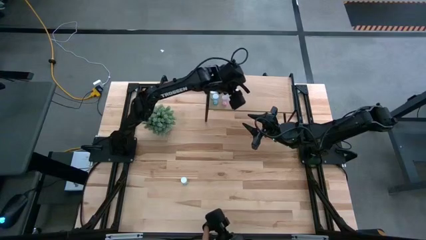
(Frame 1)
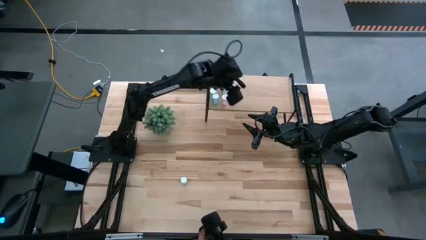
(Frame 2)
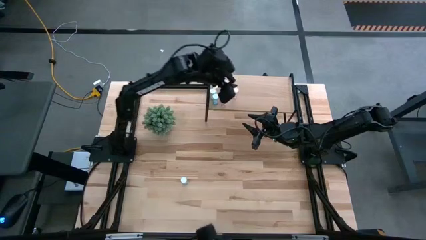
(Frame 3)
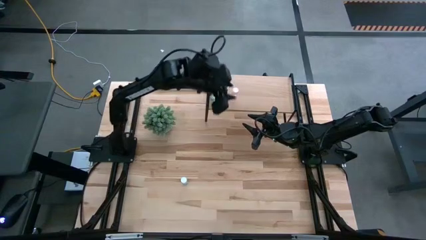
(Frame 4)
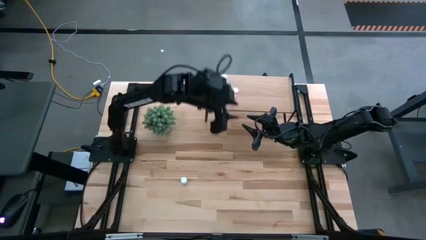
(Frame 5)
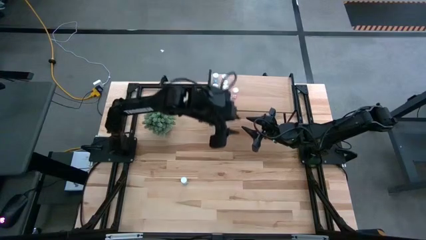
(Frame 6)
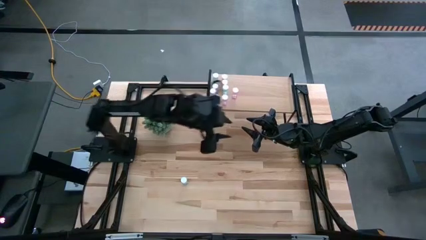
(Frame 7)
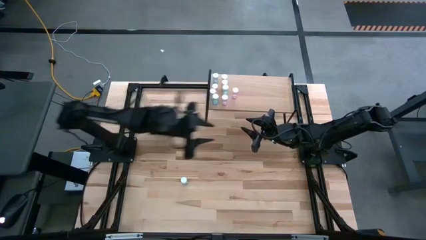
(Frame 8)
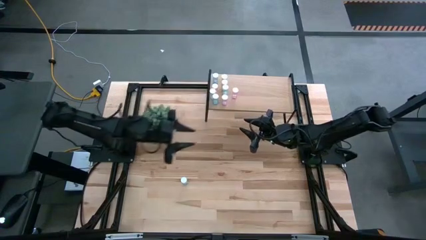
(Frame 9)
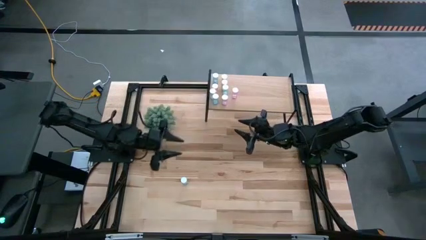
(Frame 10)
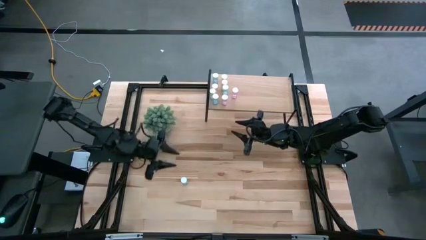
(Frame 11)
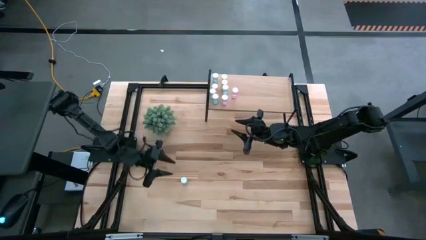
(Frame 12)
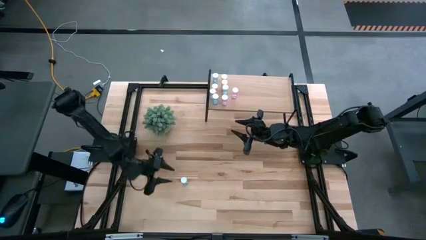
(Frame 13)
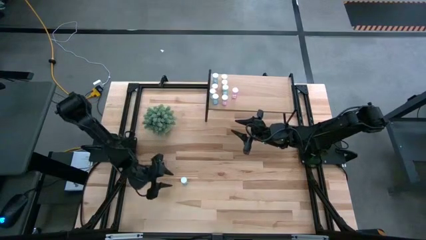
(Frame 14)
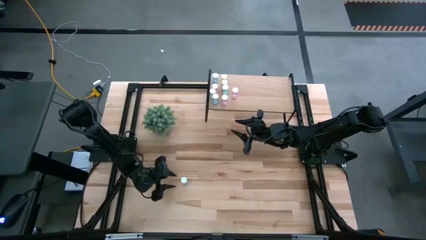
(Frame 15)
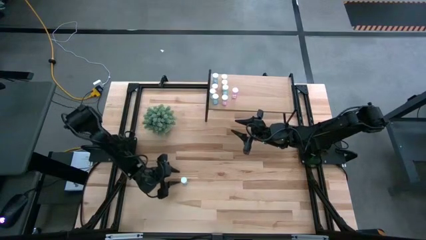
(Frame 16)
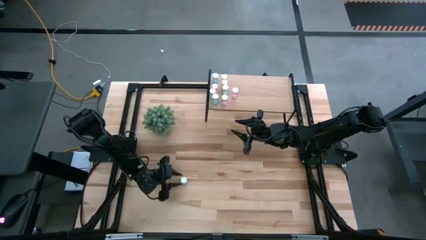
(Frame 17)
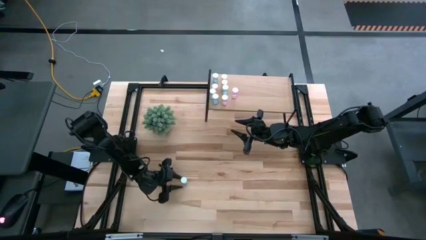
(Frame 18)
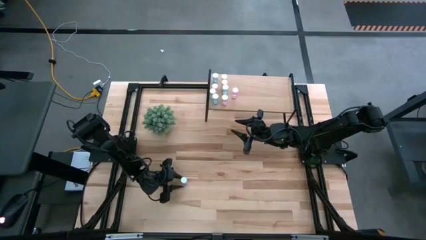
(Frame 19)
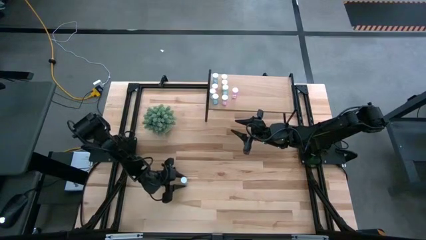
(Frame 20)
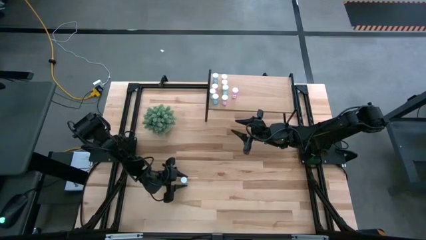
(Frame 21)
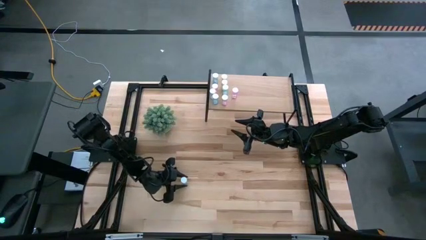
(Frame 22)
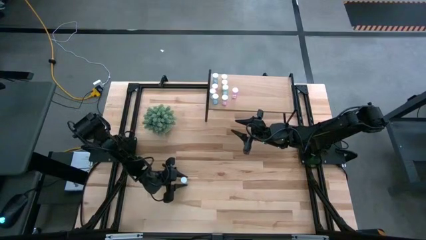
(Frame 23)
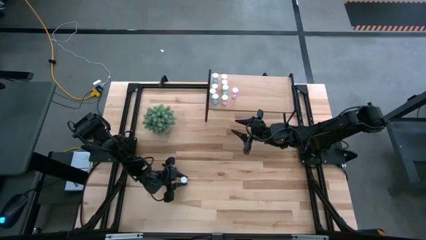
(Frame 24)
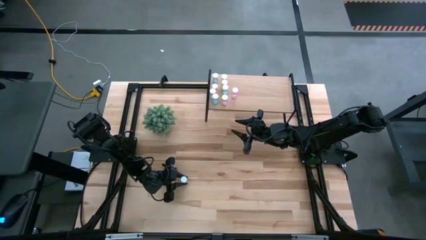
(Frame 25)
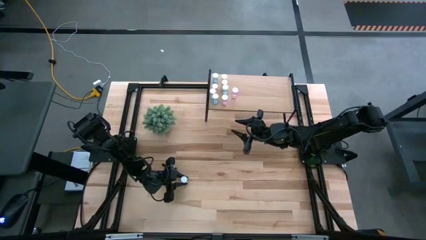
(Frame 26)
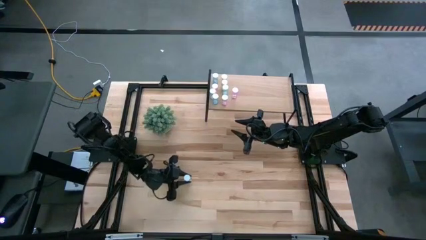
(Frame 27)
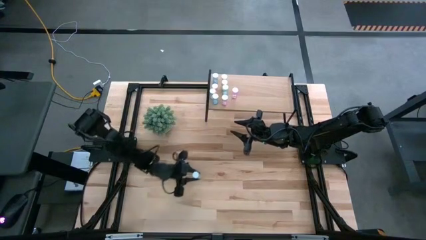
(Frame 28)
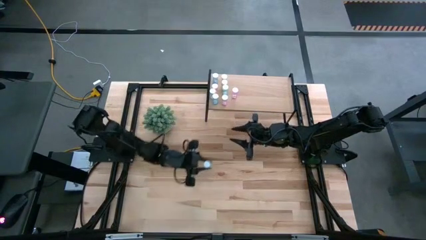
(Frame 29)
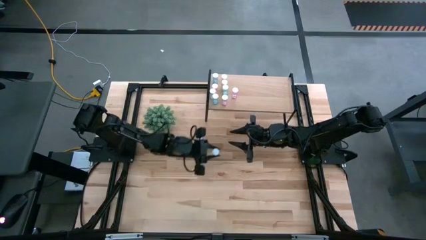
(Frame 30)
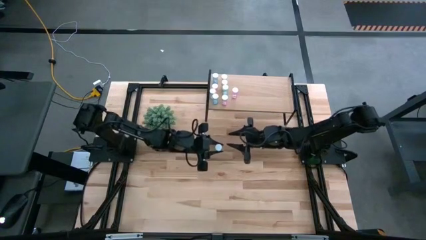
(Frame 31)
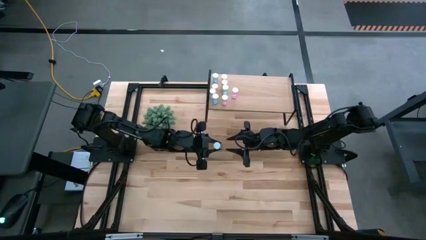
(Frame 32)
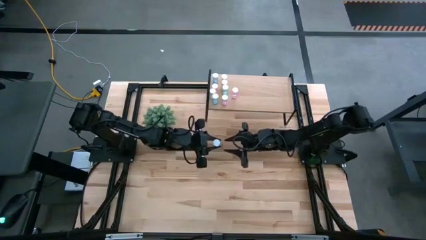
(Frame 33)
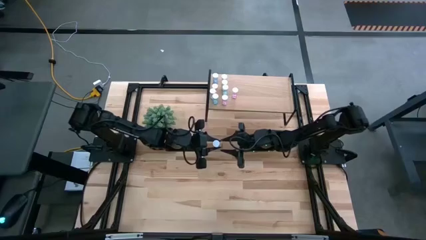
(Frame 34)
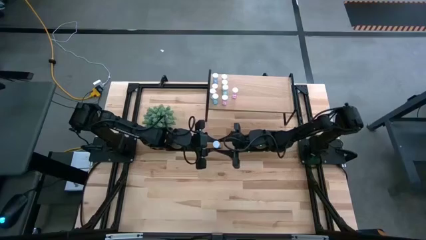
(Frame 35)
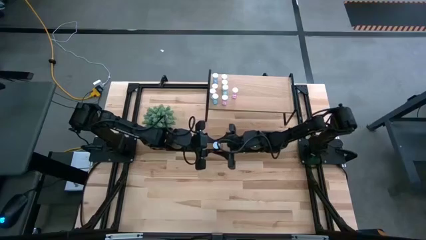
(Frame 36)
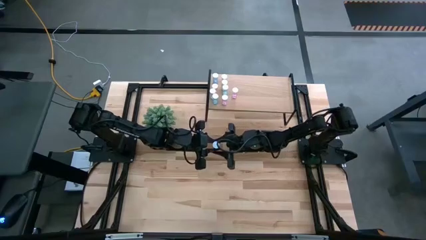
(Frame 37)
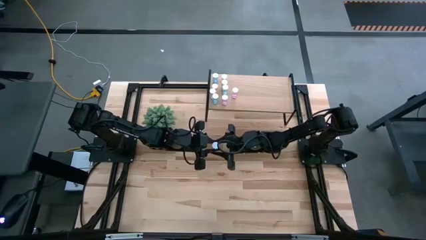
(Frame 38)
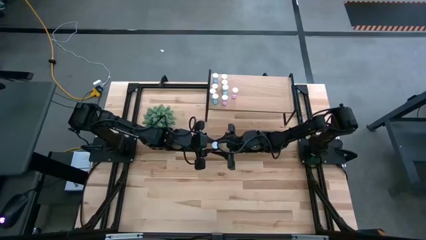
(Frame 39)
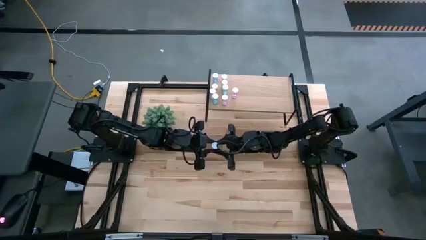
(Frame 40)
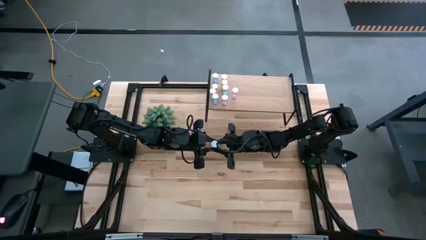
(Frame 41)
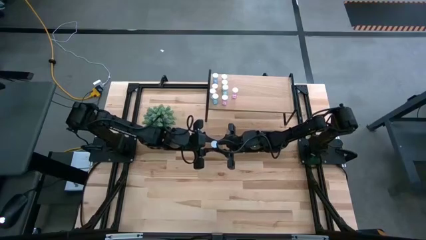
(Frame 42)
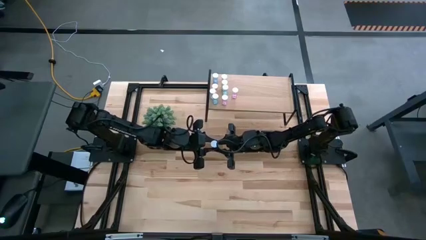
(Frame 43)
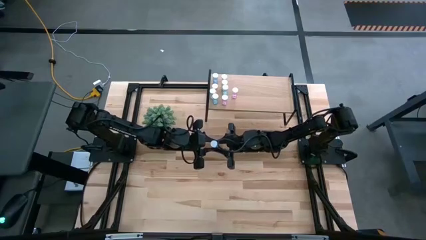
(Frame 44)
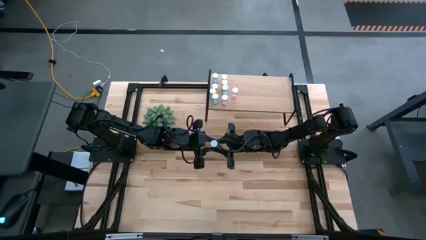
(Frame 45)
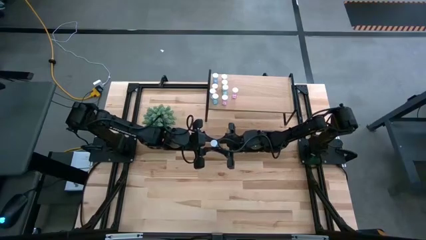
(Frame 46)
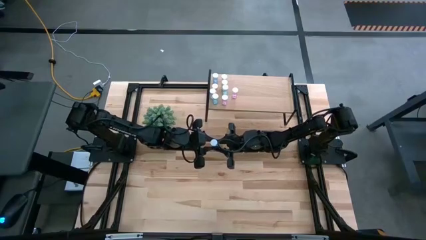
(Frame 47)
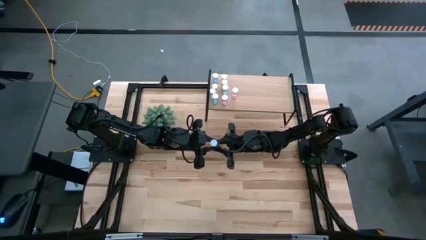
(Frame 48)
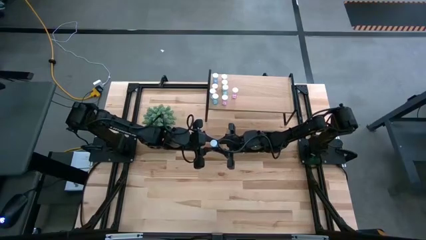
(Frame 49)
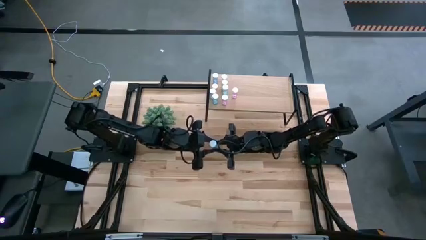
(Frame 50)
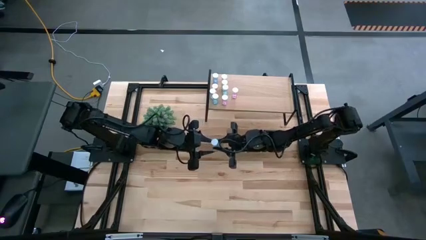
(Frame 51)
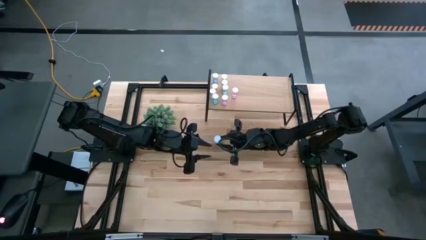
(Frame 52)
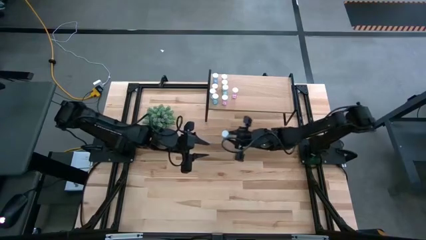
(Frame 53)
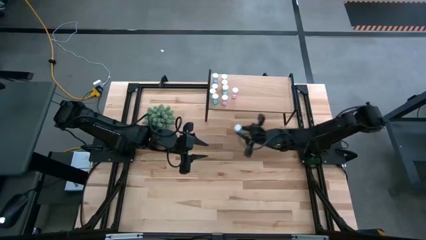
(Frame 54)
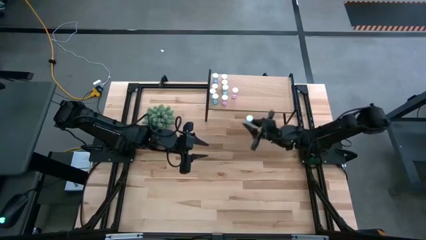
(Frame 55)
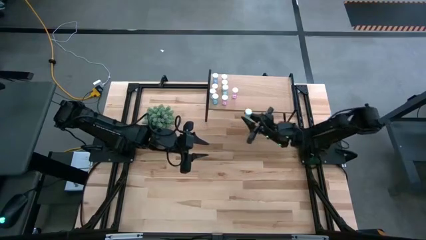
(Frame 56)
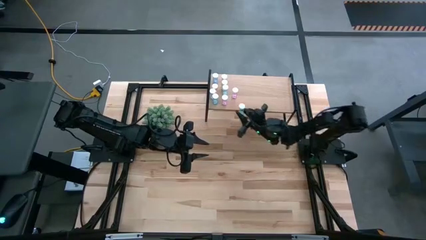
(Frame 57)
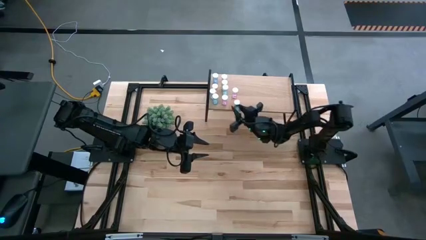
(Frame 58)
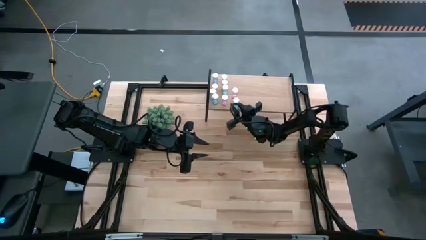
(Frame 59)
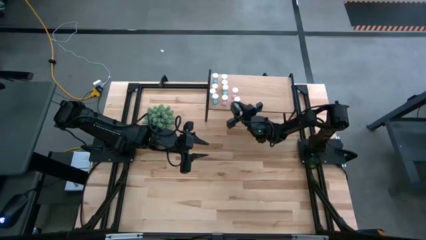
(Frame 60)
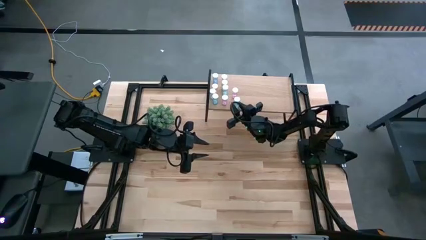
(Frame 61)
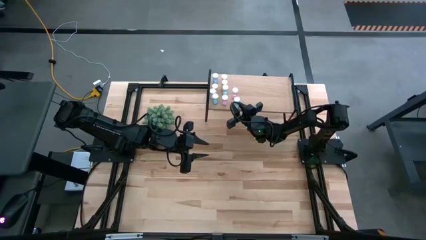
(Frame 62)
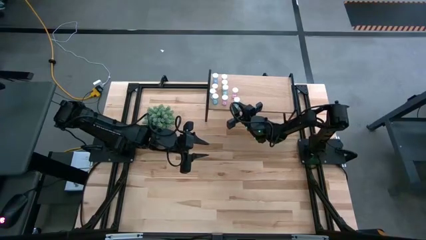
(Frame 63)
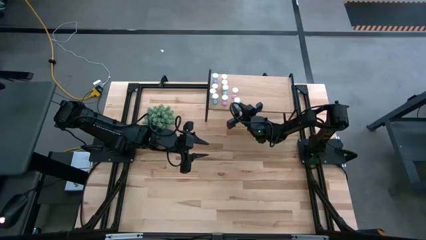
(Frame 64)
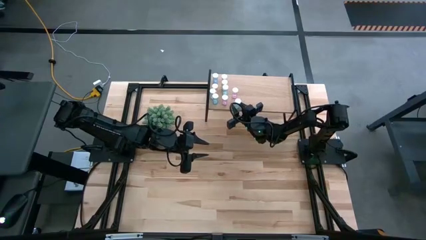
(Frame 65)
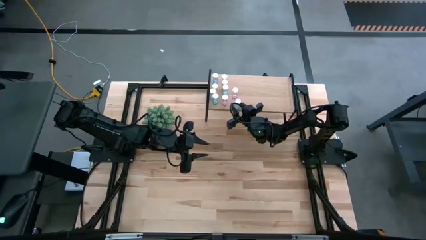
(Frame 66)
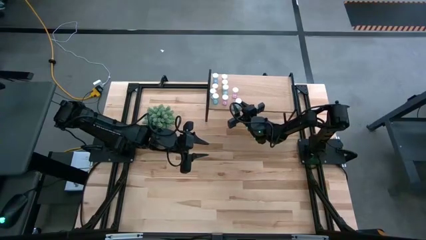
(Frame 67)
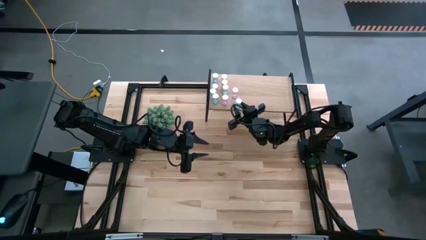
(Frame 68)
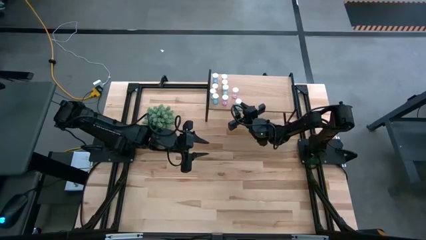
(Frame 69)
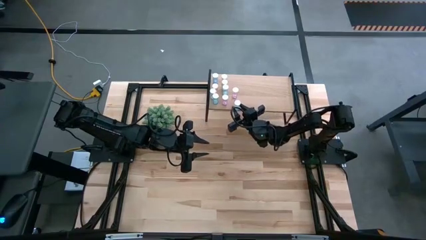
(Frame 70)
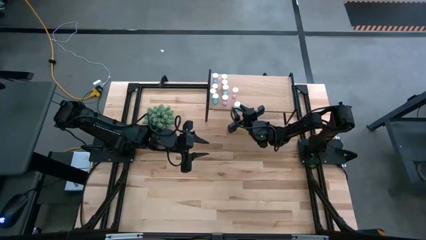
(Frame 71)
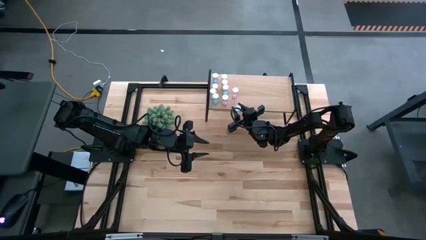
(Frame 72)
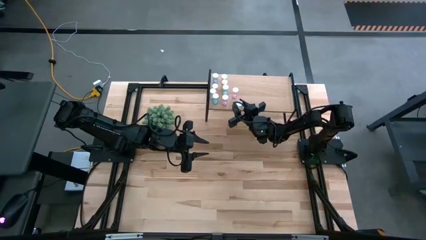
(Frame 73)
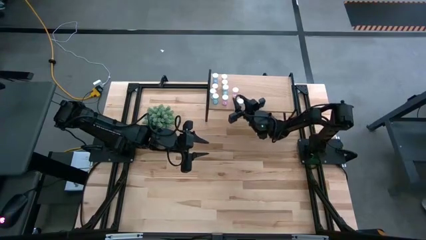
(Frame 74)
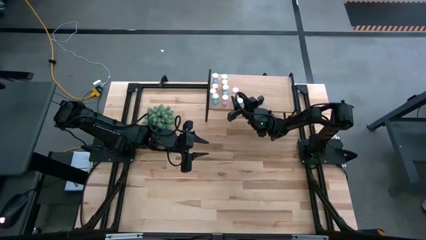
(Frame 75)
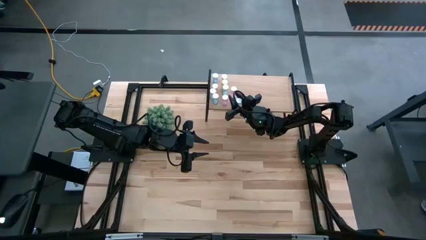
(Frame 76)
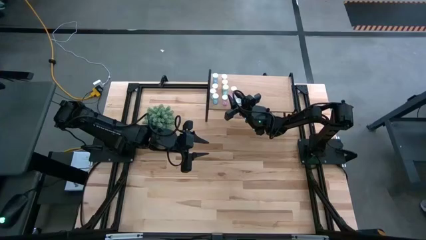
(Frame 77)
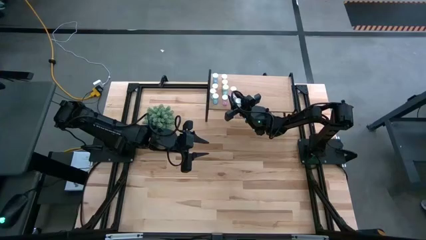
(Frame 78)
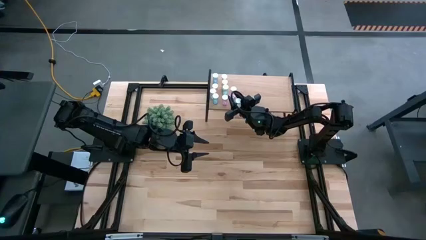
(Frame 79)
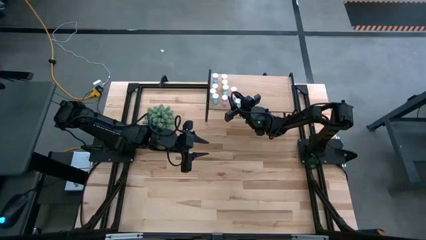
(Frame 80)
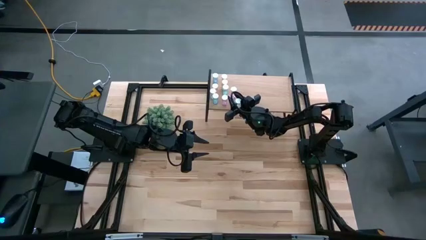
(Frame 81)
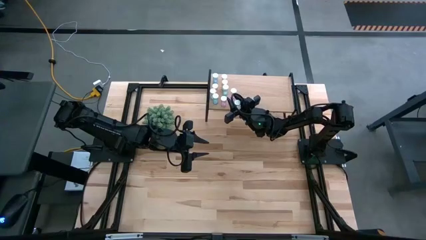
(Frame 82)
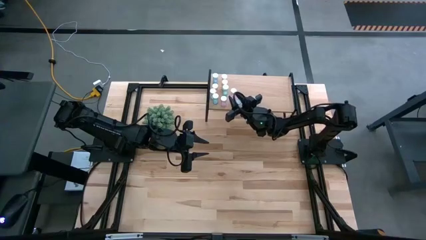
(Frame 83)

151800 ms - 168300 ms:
Task: Pick and place medicine bottles onto shelf by color
Put the transparent blue medicine bottle on the shelf
